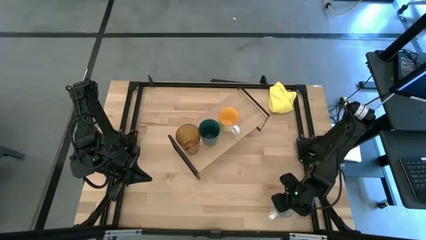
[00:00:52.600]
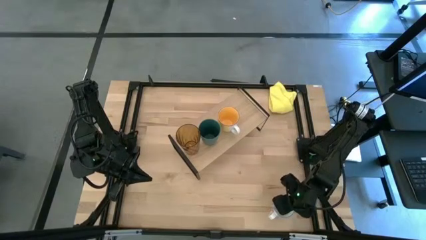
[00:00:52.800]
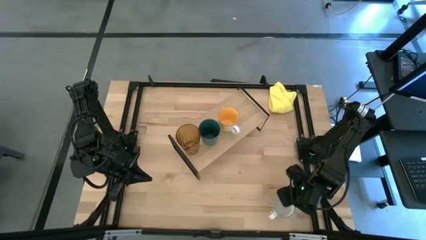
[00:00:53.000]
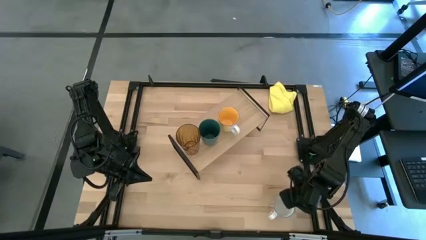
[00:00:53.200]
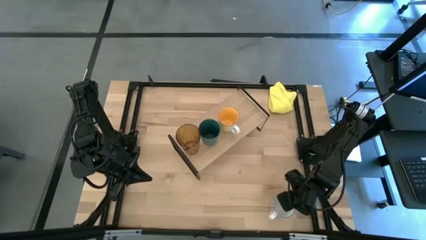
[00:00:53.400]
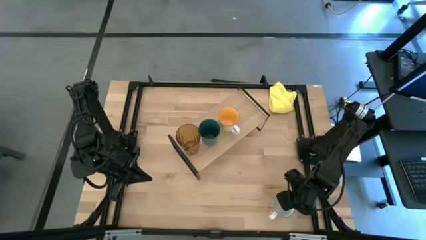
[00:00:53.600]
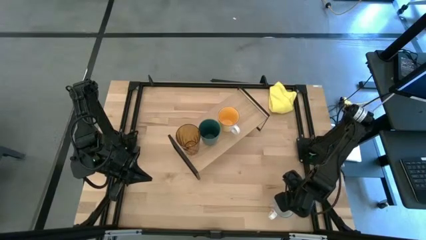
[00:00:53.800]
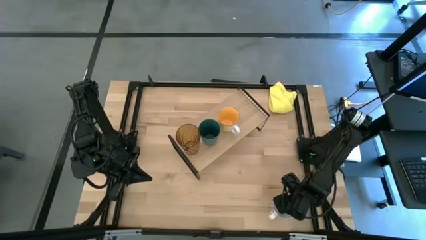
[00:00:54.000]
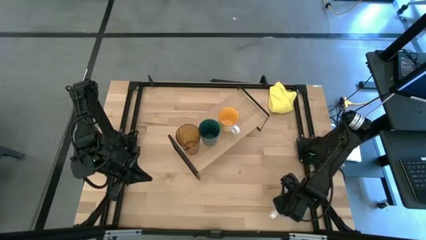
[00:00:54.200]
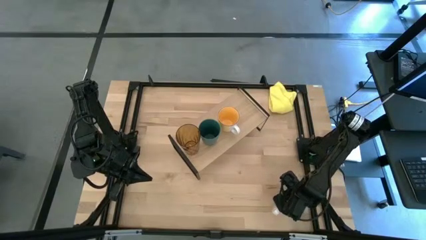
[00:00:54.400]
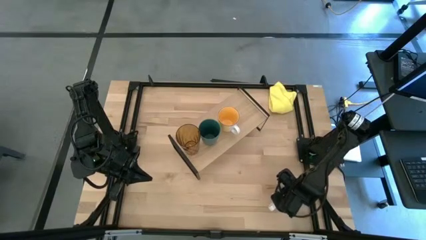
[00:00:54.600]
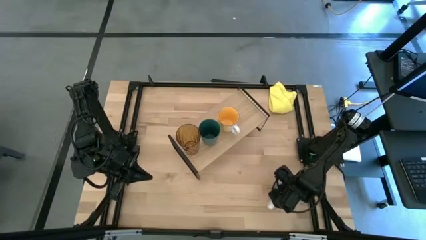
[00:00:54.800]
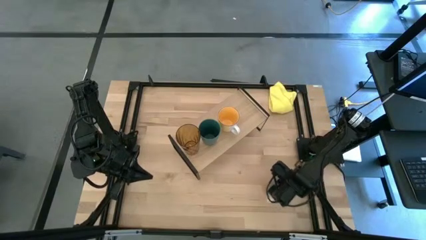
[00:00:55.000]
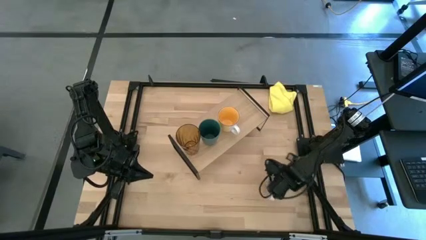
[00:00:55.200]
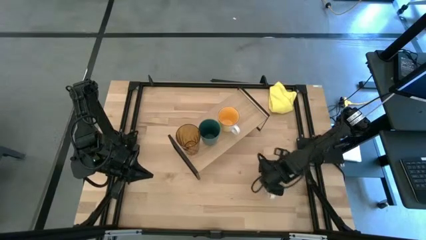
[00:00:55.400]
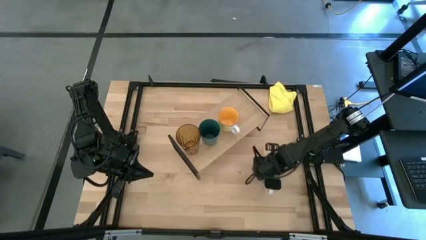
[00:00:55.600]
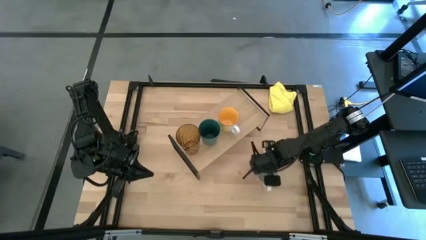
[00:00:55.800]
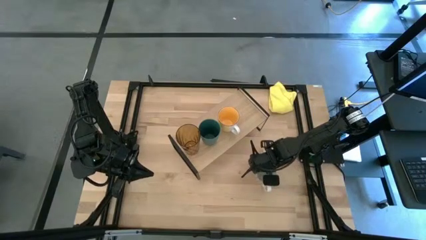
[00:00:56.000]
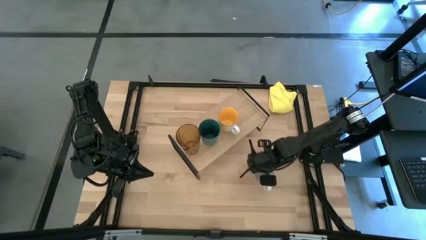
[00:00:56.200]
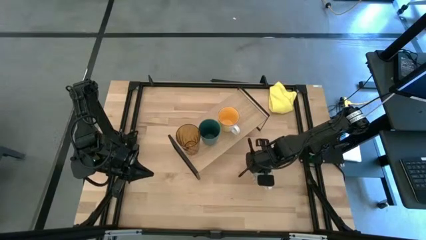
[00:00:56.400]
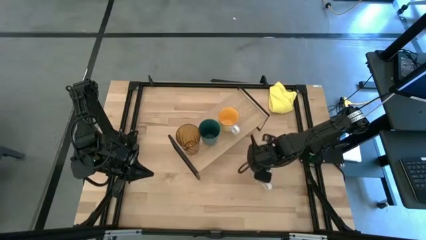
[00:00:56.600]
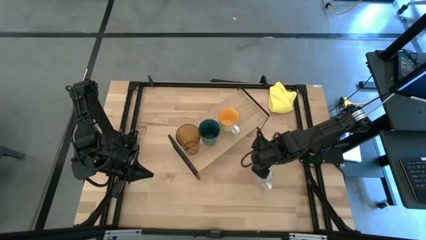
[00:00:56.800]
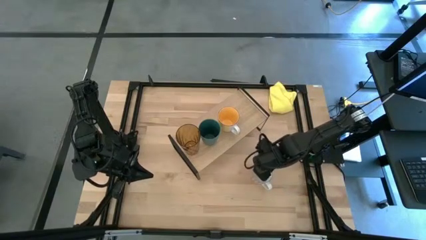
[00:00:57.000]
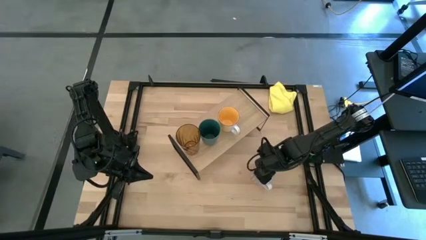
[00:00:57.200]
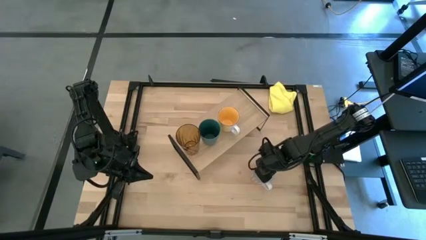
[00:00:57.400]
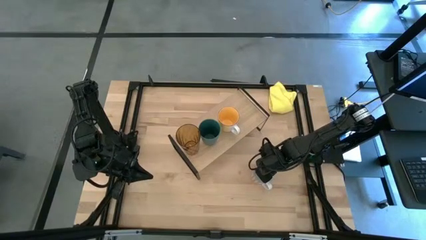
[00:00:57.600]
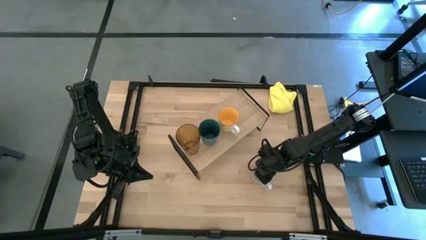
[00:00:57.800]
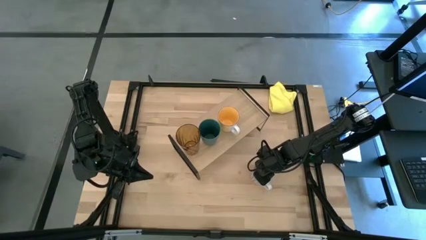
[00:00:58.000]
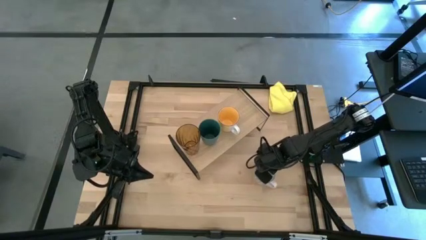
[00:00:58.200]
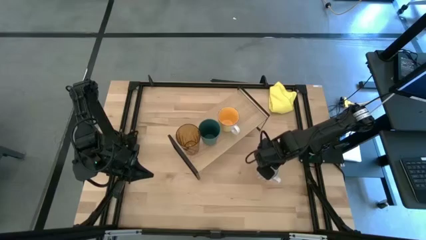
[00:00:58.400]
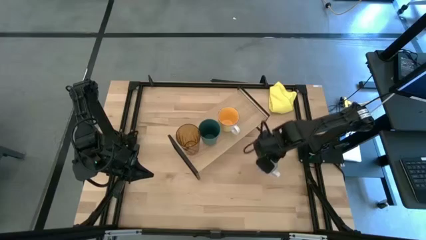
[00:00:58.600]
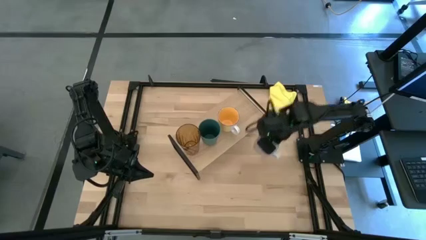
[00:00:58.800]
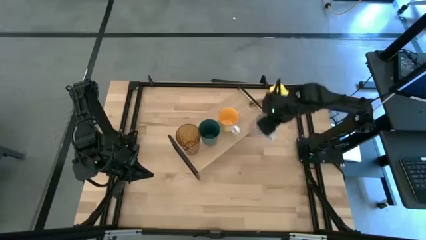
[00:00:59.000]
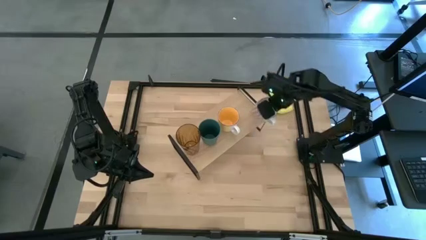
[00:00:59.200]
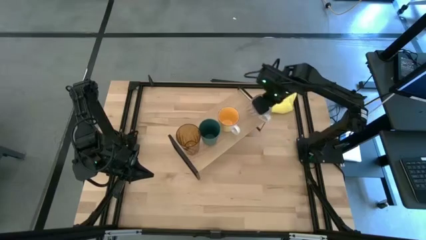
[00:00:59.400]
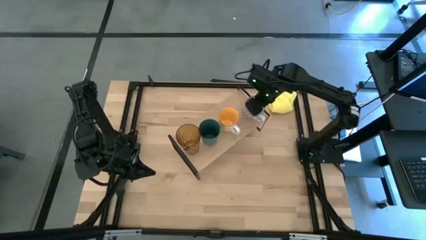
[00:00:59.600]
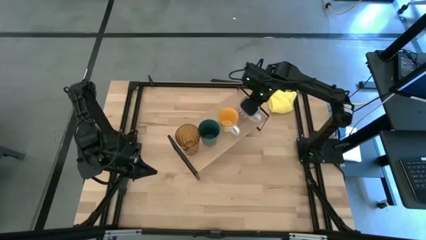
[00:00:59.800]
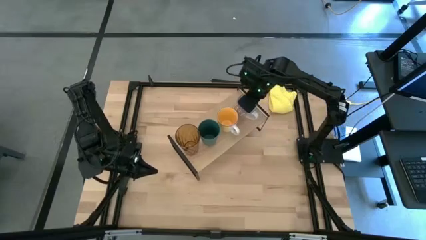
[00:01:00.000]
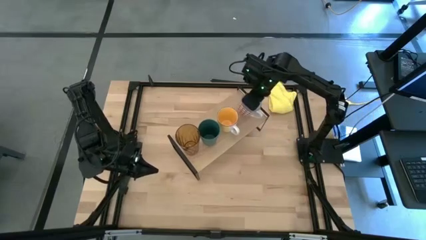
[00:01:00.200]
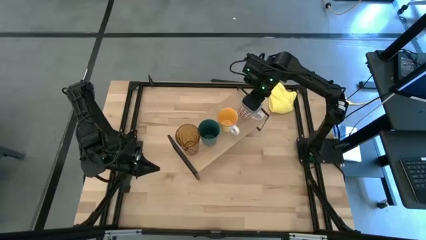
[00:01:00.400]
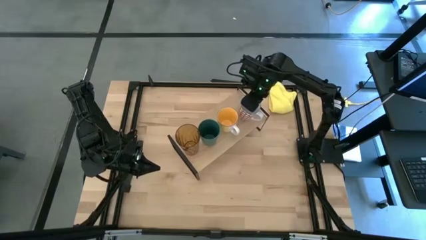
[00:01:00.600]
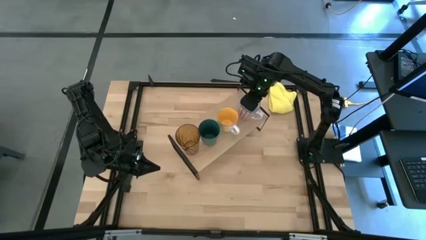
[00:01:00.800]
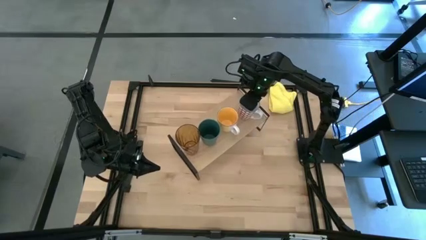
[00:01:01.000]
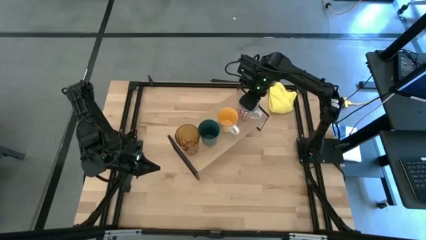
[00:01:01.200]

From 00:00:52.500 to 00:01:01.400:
Task: Stack small to large cups/mugs on shelf
Put the red patterned mug on the shelf

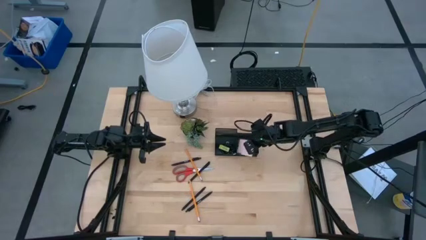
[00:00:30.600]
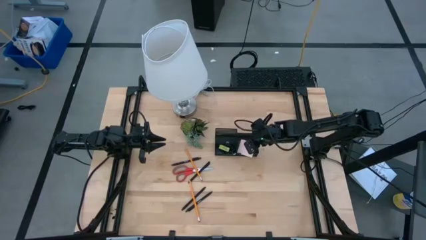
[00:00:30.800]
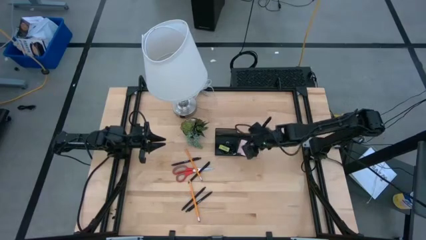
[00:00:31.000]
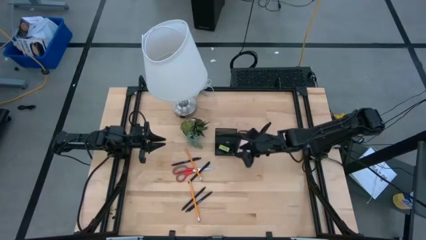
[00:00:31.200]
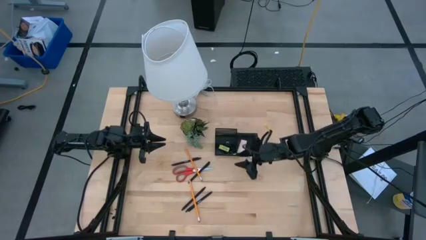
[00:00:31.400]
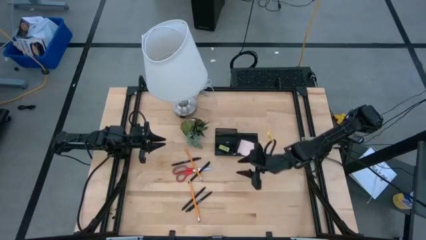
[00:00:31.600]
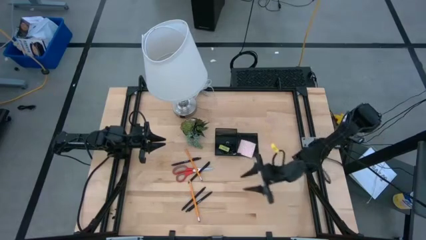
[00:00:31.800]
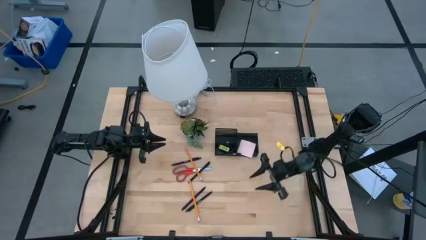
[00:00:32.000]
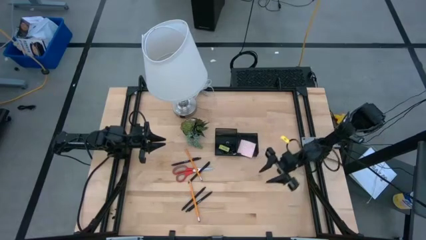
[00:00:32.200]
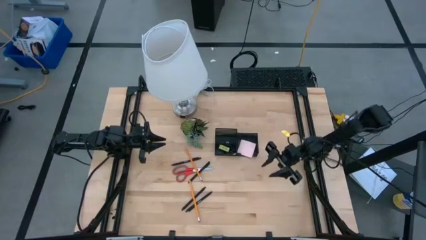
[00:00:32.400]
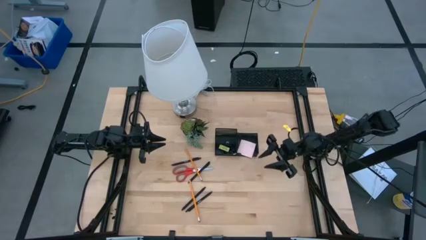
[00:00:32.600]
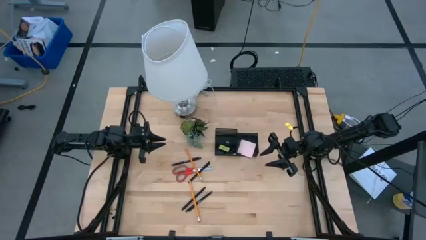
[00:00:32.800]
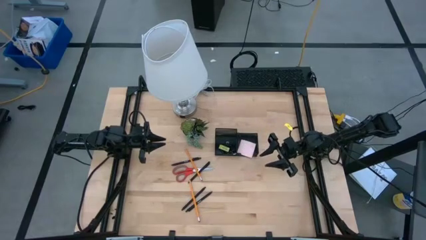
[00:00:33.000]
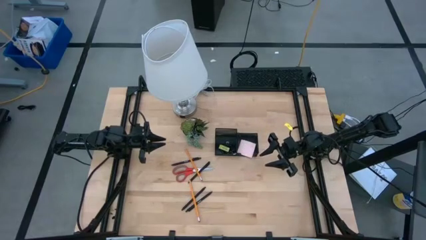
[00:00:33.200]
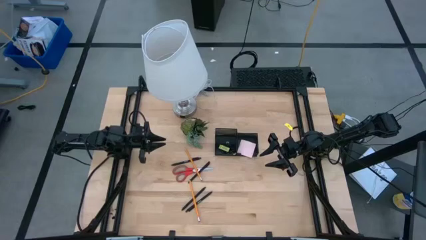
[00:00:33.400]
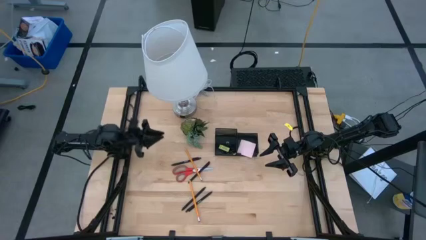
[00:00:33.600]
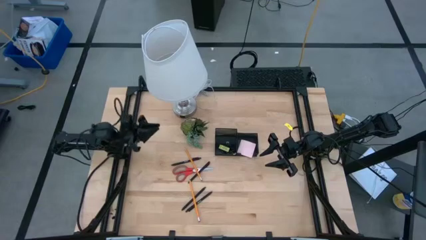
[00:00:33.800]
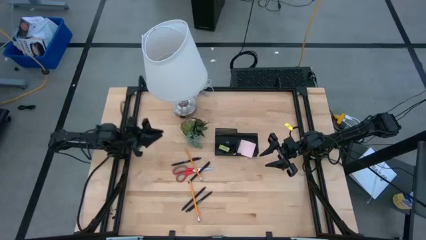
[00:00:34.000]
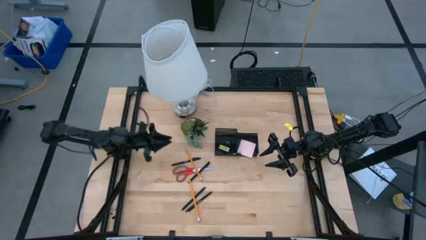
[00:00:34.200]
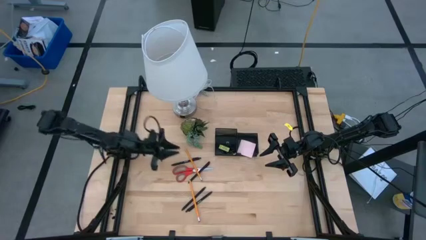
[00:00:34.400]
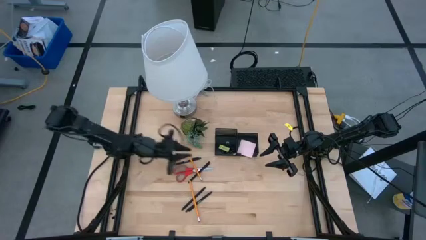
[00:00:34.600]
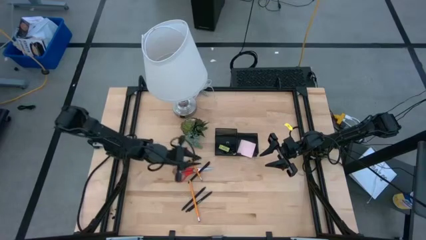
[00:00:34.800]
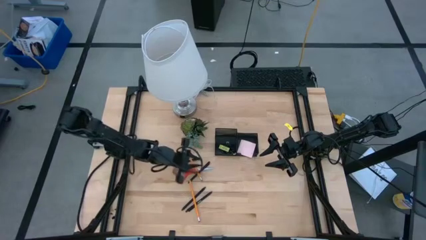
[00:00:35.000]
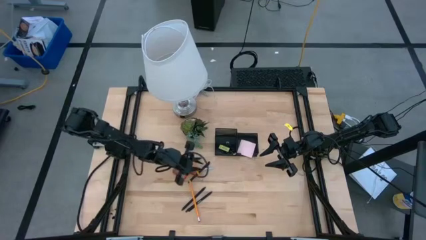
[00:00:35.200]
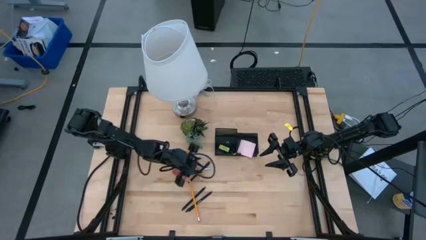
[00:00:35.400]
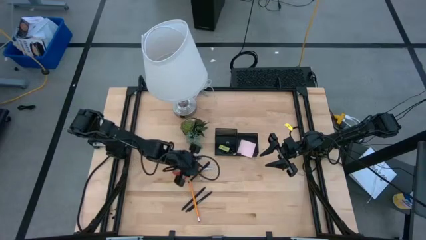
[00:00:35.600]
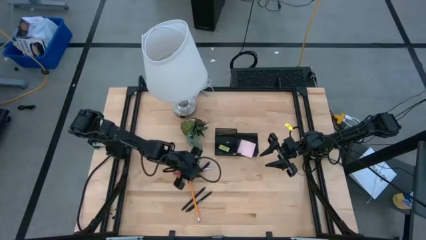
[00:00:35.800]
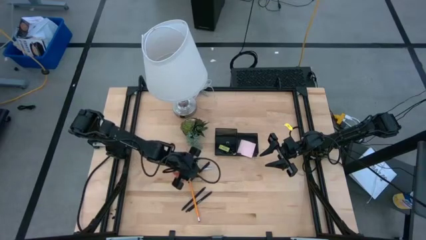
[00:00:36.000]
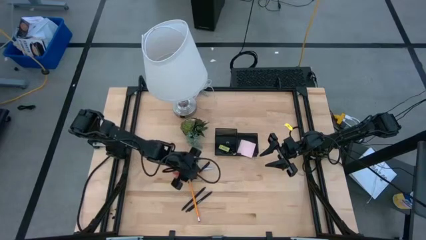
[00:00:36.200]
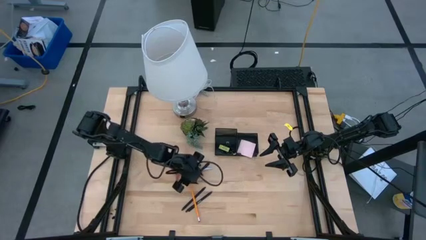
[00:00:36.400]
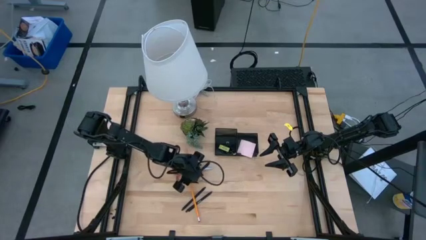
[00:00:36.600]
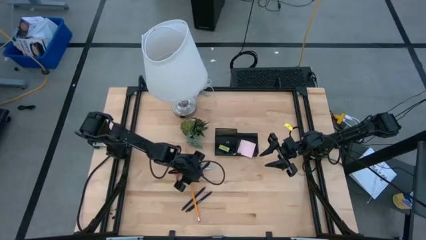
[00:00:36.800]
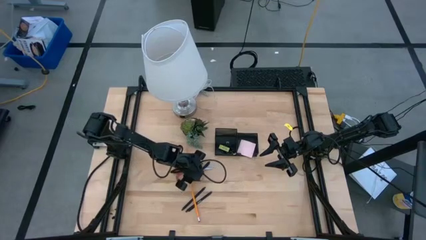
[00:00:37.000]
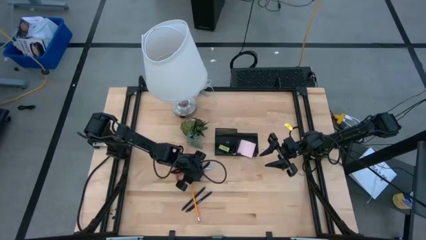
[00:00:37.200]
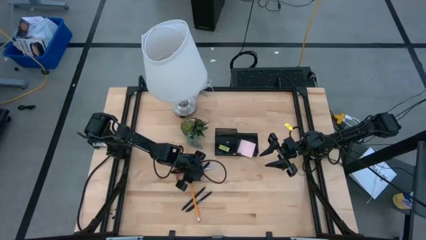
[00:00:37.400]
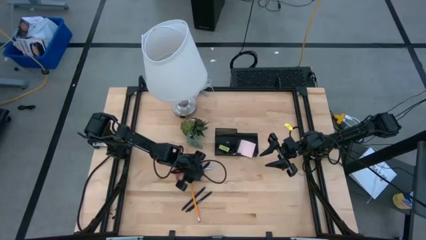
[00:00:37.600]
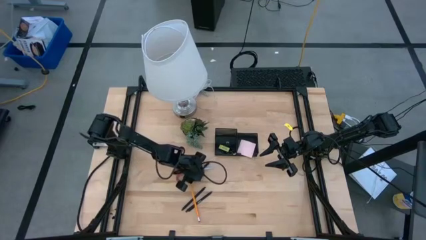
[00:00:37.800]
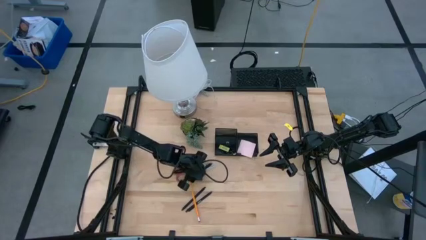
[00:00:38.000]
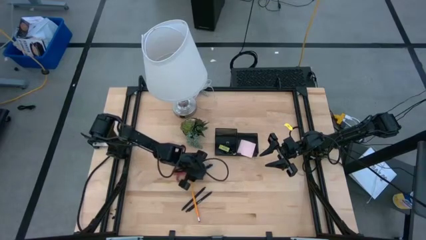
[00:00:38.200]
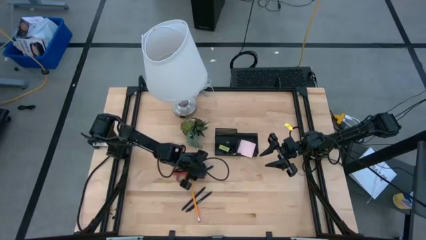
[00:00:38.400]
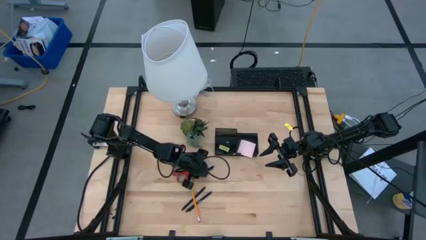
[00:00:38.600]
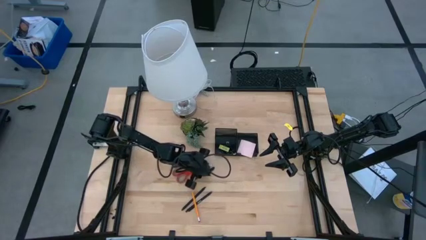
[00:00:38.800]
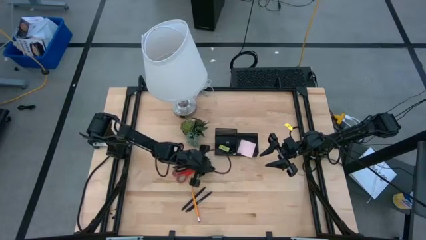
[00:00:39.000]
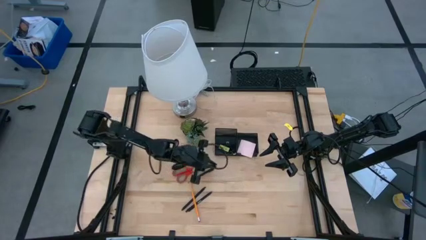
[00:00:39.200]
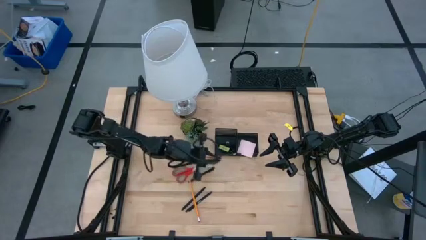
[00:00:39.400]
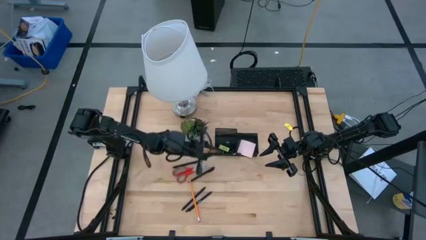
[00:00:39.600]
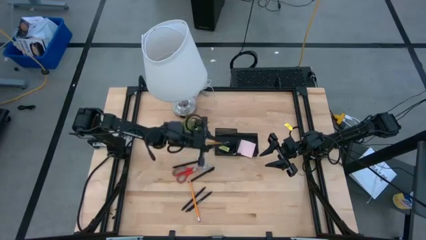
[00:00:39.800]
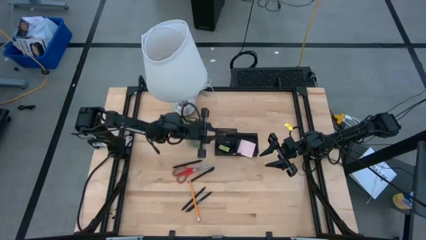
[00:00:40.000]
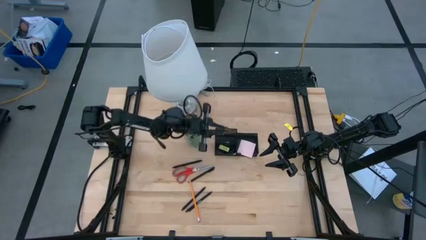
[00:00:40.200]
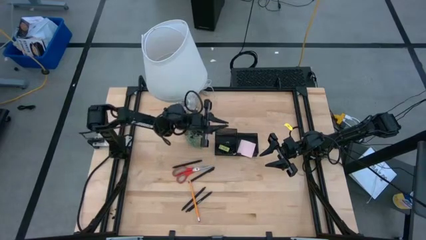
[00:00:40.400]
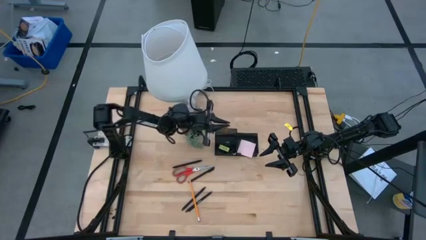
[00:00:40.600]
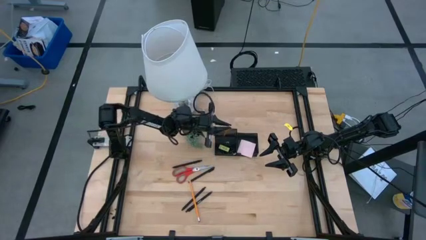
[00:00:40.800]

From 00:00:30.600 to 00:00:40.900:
Task: Pick and place office supplies into organizer
Put the orange pencil into the desk organizer
